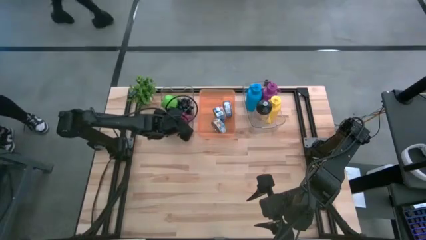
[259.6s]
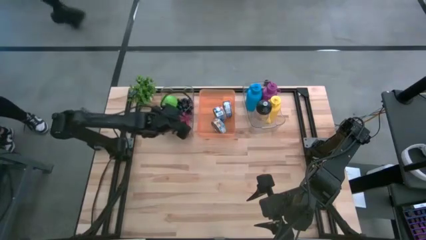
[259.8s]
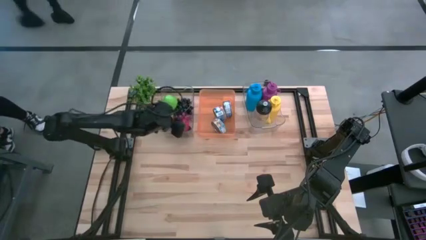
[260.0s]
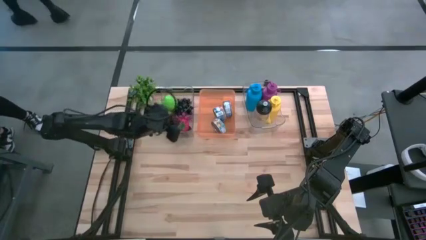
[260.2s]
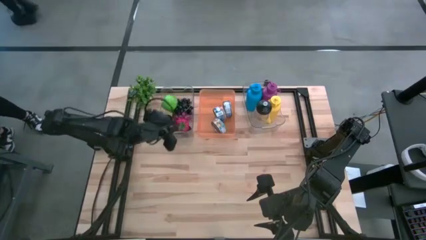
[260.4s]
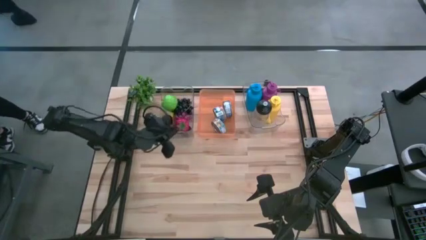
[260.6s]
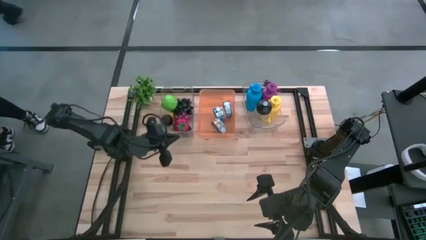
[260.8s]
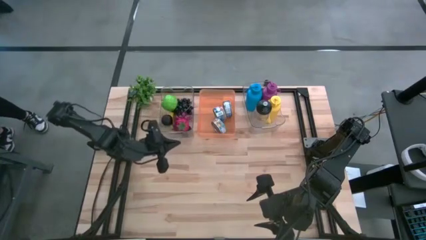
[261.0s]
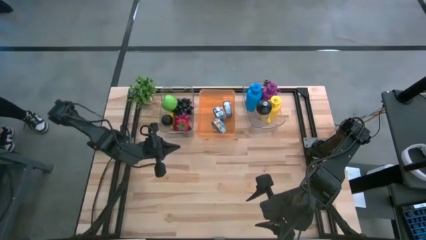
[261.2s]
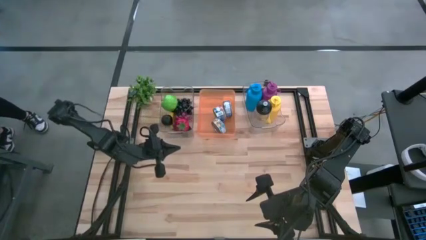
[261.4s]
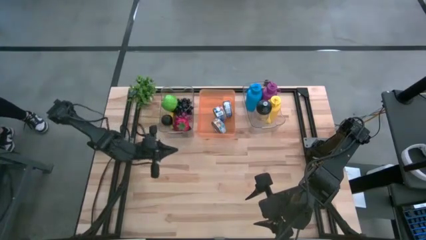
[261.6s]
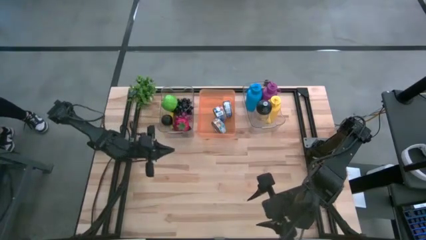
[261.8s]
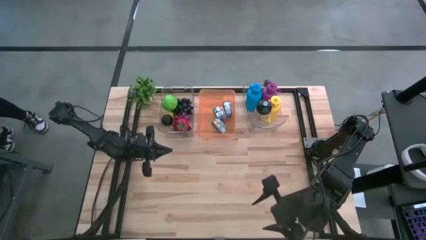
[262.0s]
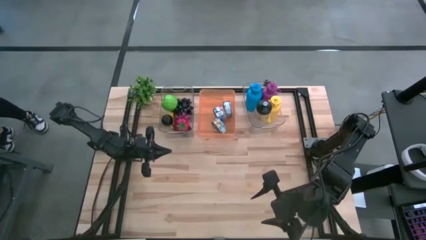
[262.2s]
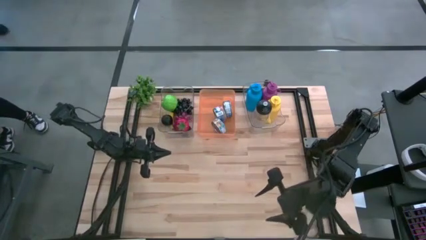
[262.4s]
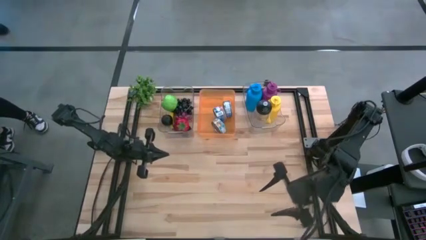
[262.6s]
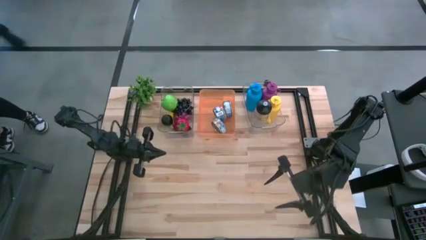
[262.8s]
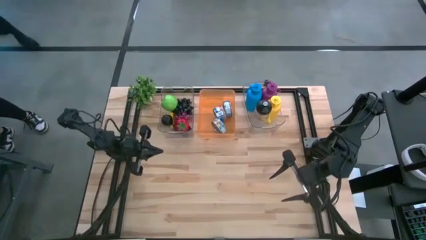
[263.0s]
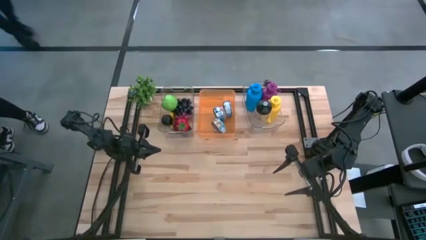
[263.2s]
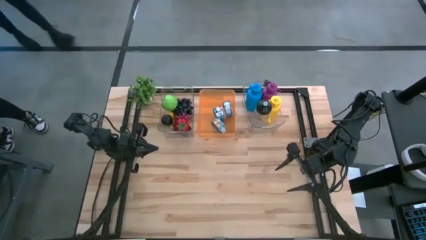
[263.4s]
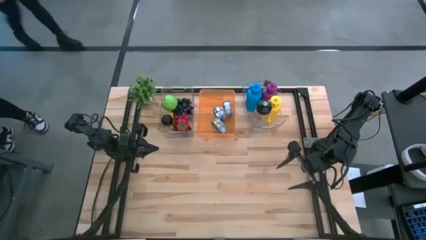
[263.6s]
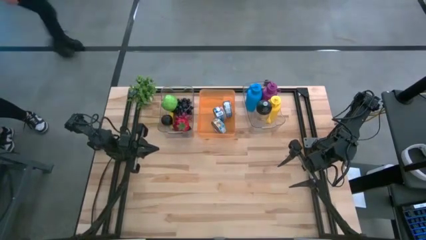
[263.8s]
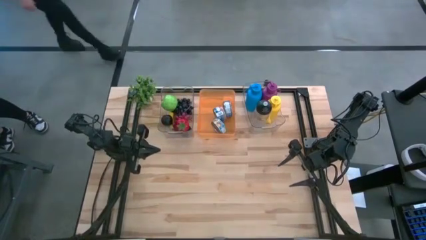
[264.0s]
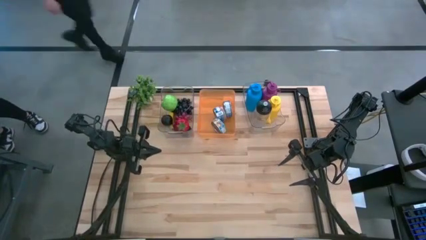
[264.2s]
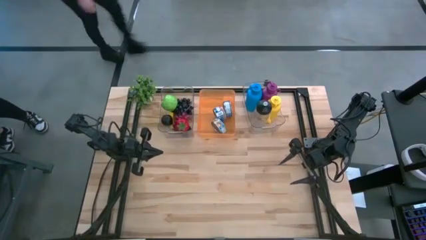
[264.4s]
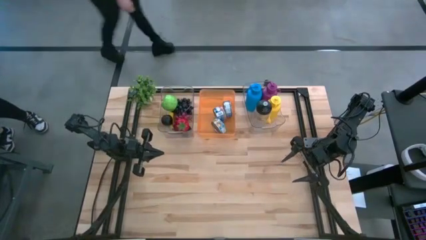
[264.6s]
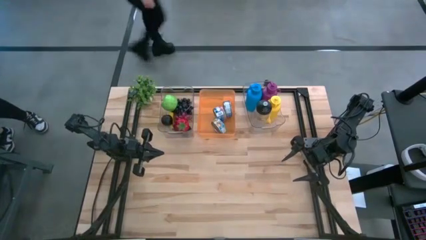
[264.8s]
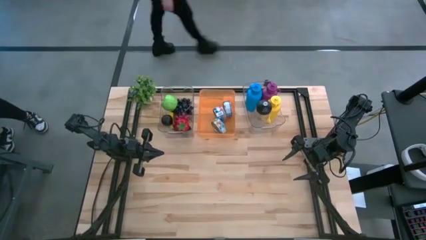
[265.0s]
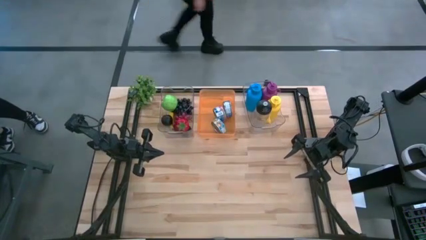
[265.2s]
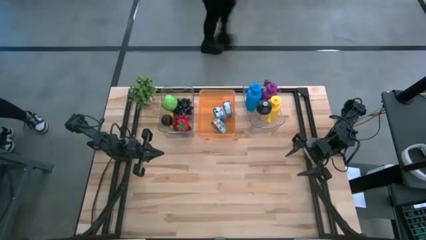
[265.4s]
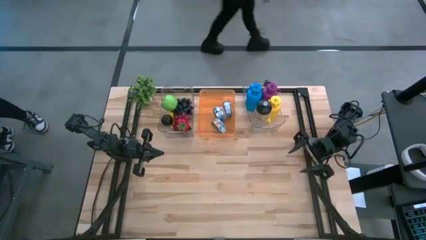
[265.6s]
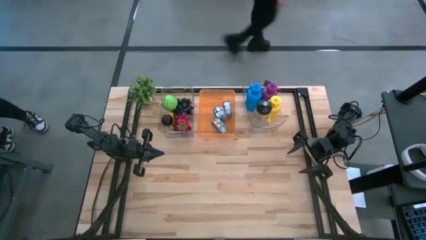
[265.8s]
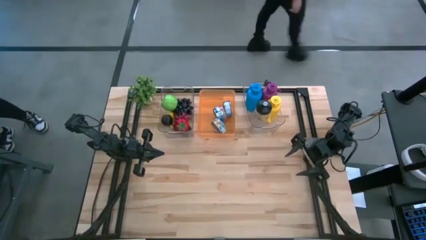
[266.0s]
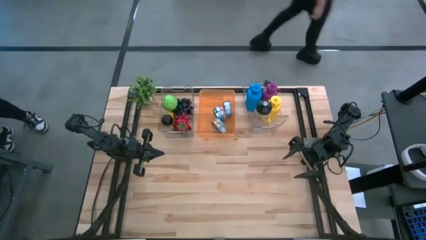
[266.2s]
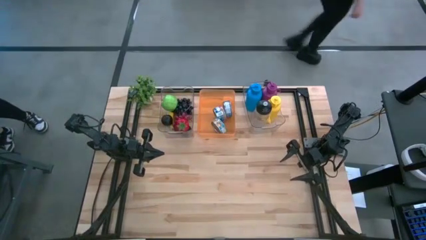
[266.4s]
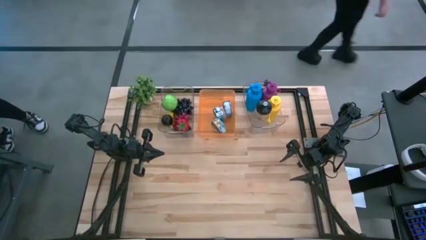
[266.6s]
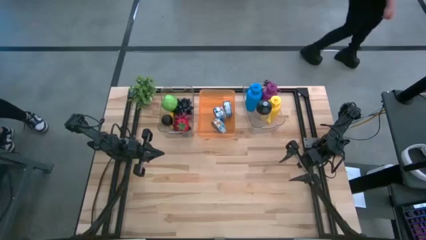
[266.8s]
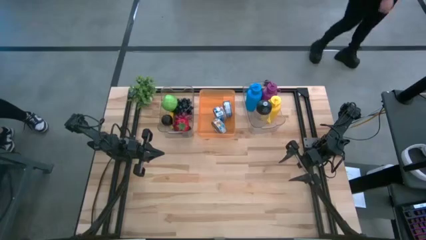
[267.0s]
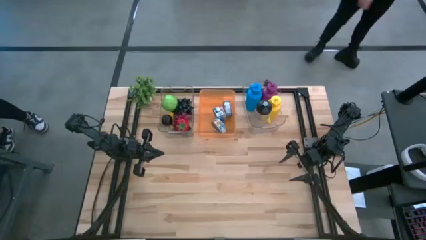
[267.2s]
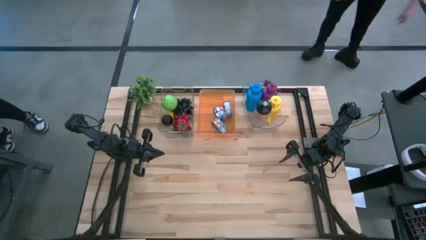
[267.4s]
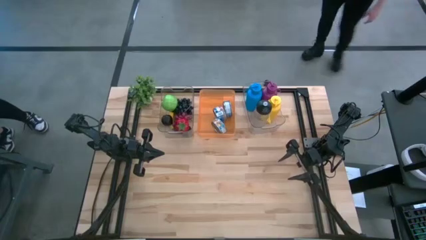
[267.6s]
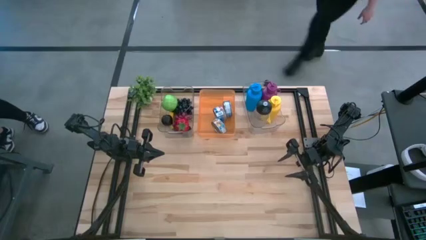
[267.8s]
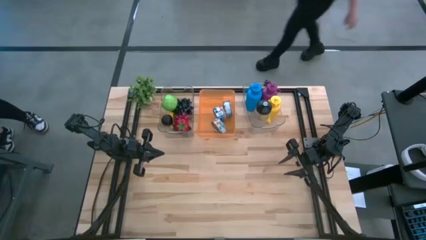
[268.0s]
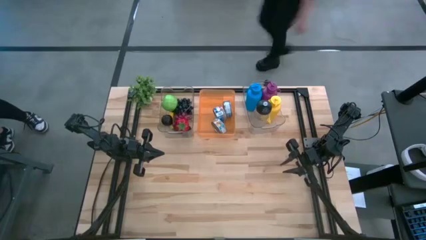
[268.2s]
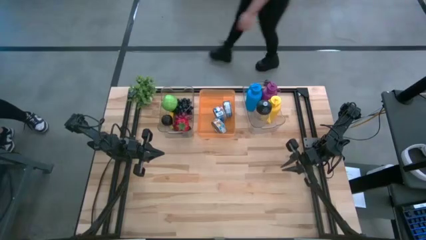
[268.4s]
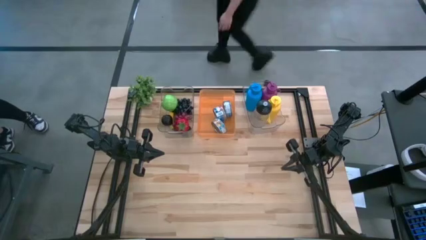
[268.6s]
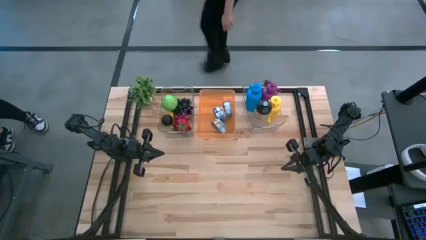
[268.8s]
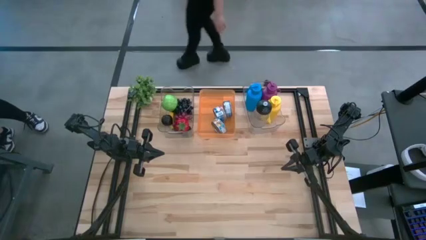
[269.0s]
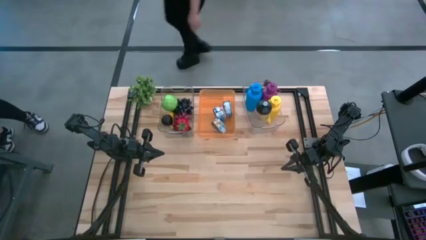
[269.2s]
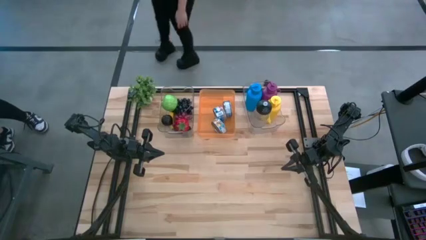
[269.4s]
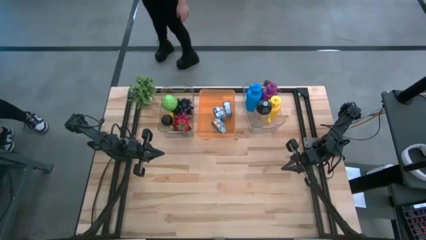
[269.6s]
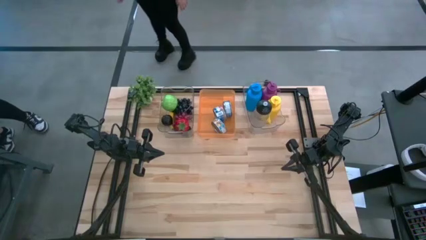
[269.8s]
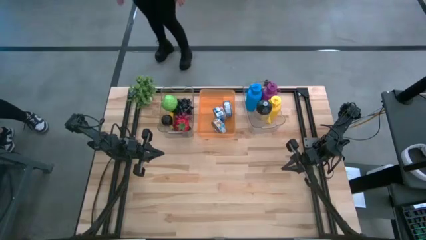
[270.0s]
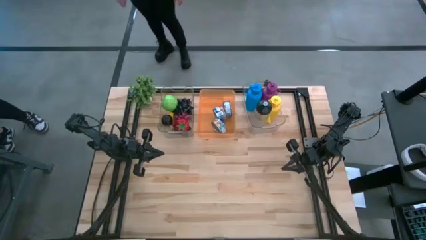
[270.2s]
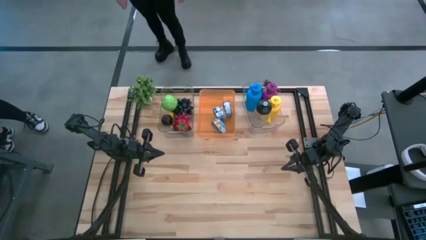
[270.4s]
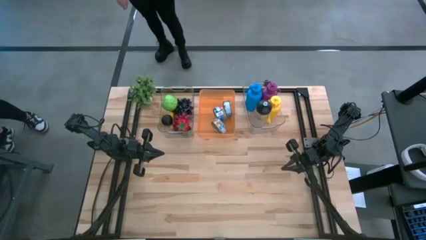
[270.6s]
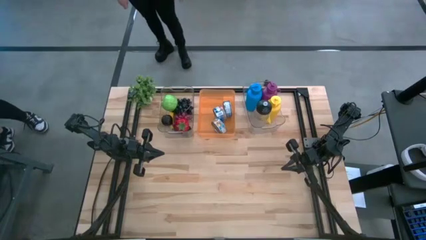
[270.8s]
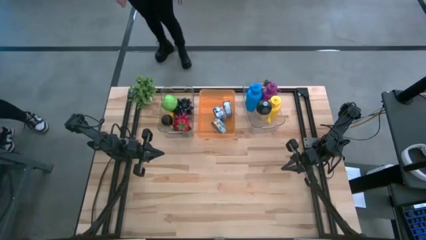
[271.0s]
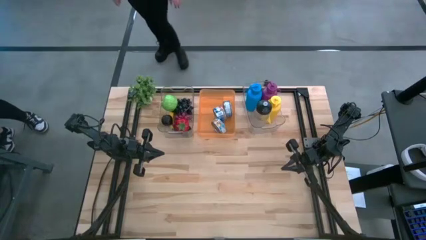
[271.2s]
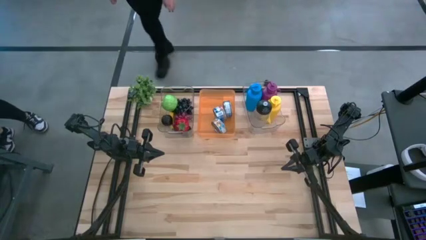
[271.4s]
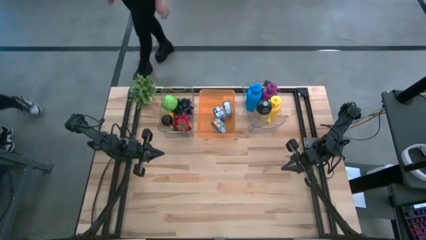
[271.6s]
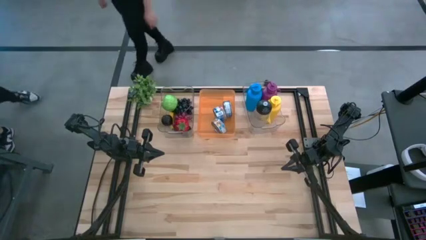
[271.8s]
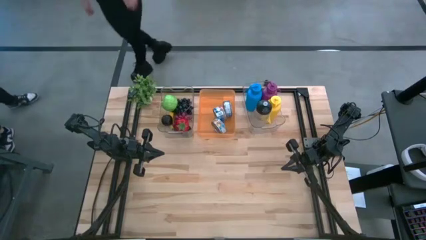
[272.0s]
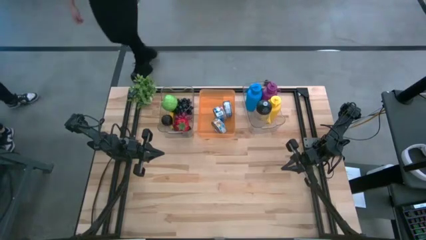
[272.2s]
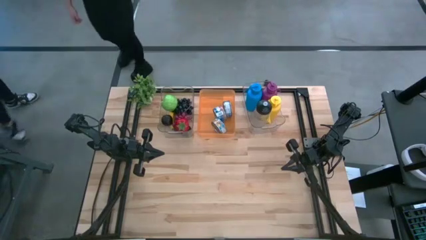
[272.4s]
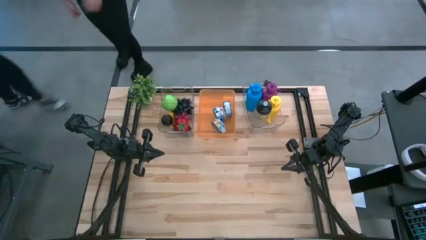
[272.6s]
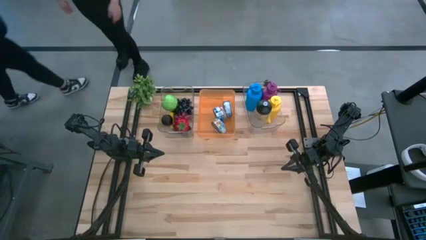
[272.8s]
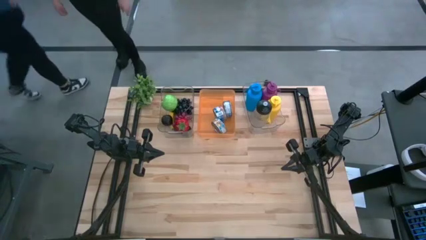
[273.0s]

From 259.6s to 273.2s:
Task: Pick & Place Food Item
Return to Home Position

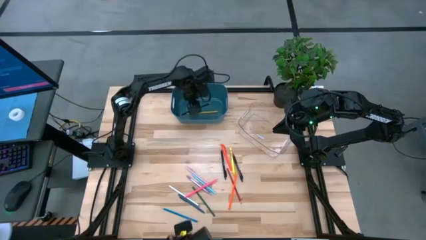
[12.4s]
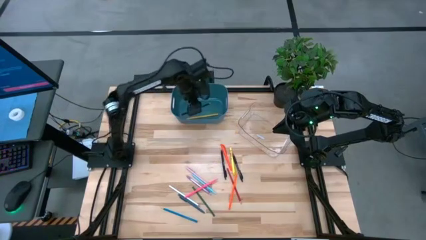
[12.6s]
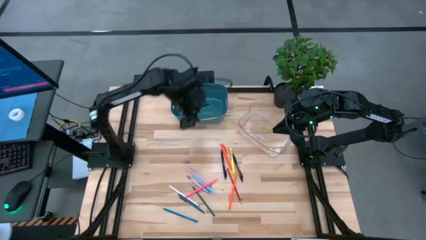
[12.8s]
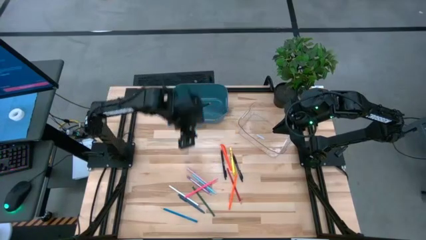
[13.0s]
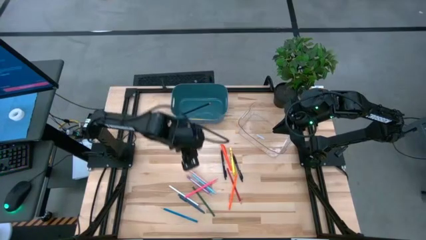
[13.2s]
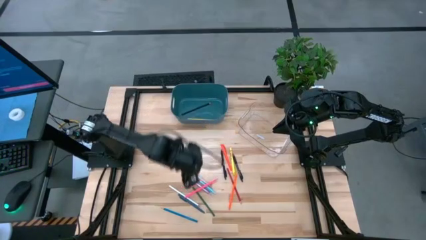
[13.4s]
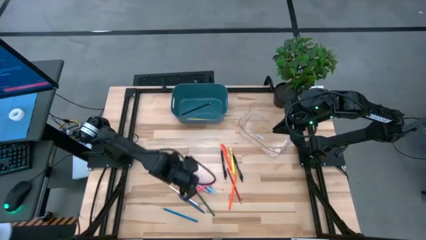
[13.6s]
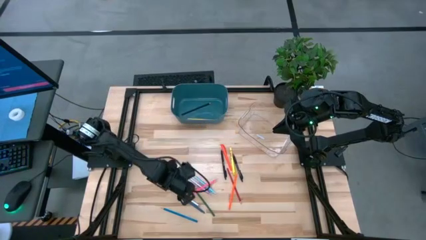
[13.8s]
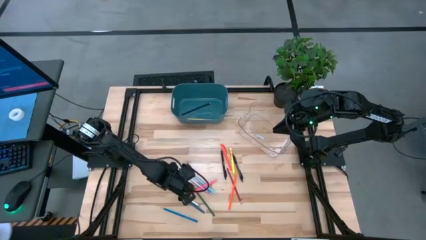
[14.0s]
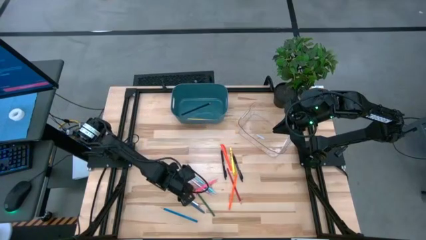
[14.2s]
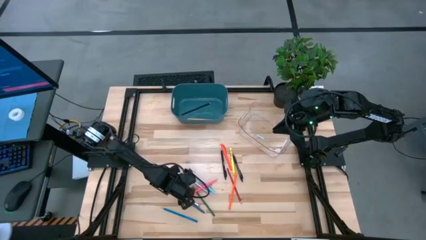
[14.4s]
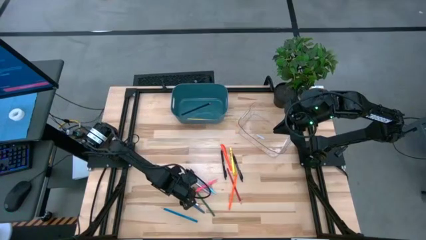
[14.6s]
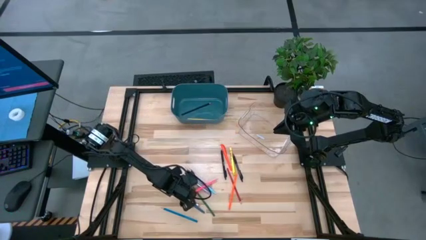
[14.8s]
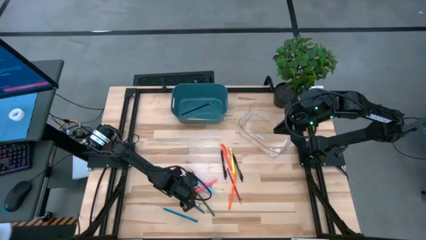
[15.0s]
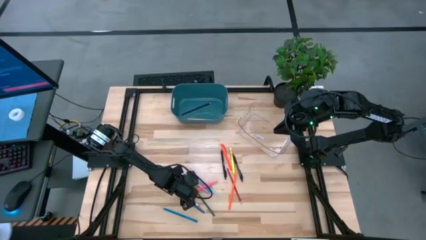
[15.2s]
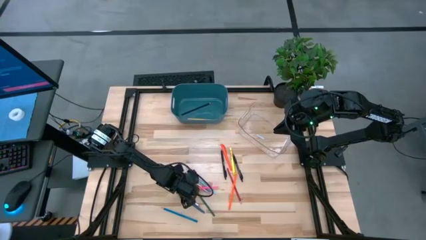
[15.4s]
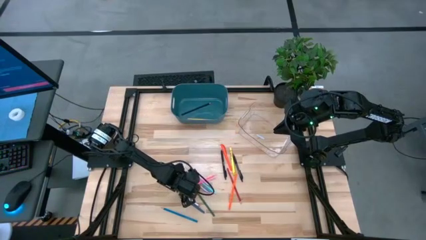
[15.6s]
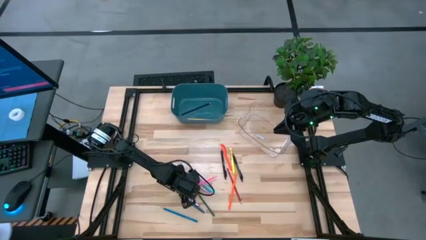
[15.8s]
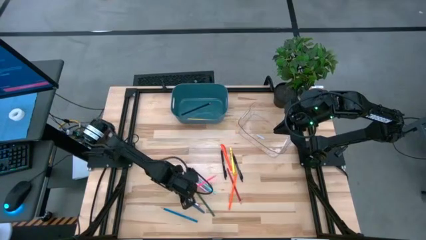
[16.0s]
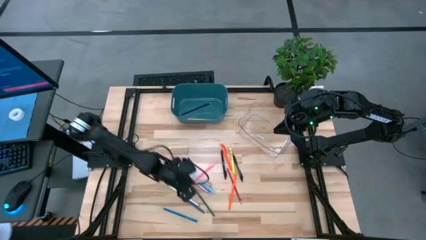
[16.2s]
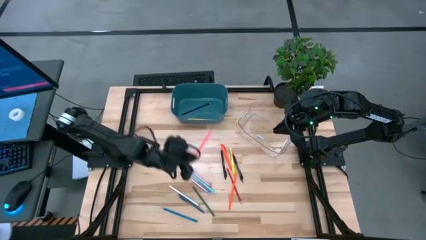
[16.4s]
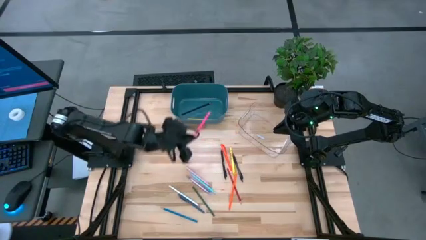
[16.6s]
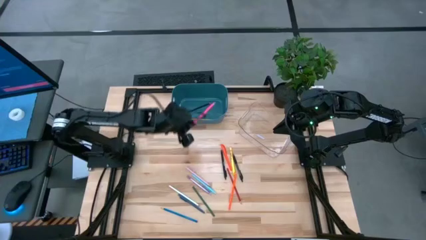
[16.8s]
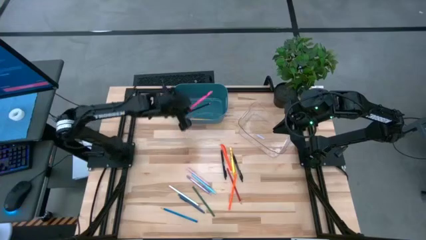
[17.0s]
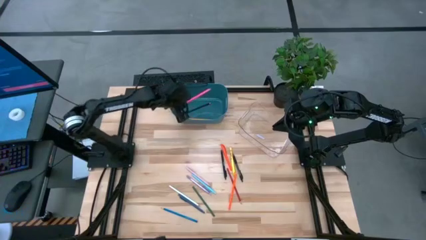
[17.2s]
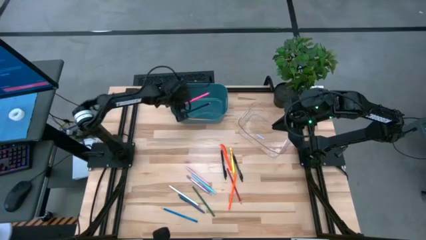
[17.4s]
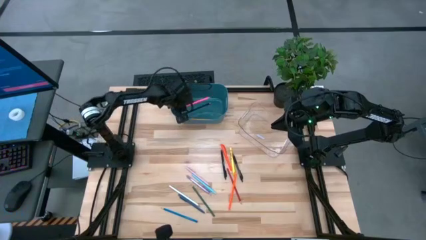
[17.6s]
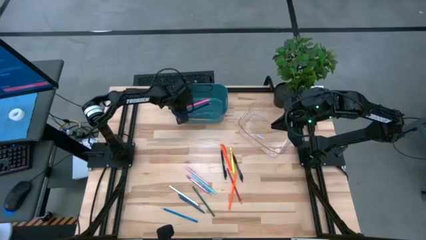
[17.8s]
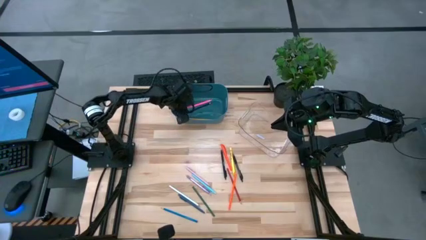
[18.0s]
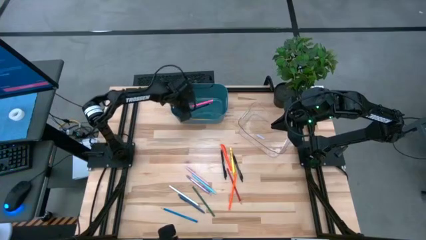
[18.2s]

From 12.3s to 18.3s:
Task: Sort pens & pencils
Put the pink pencil into the blue bin
